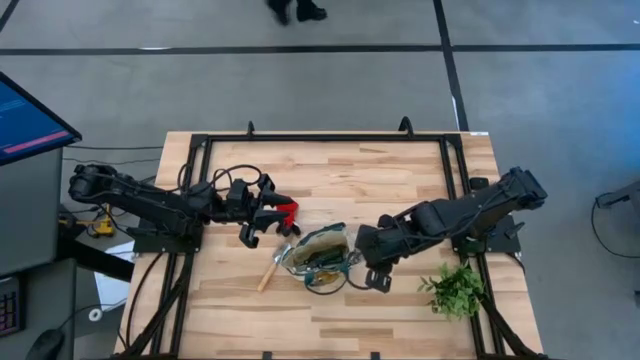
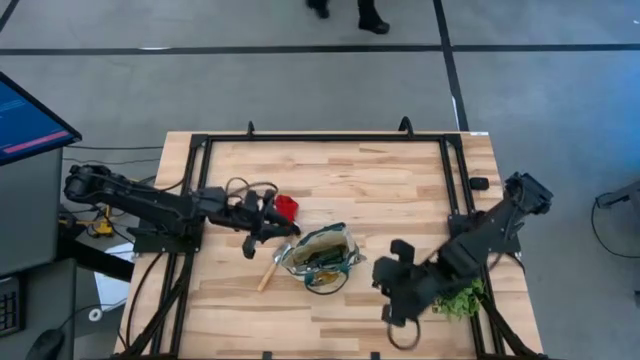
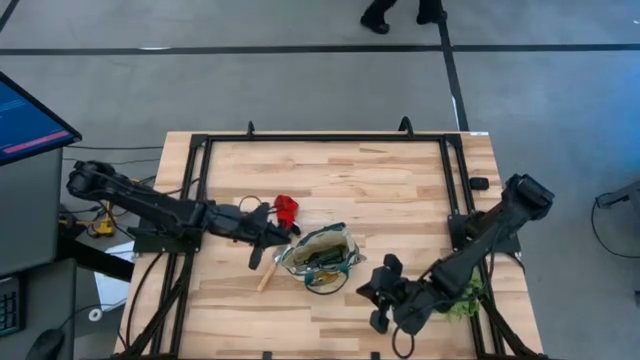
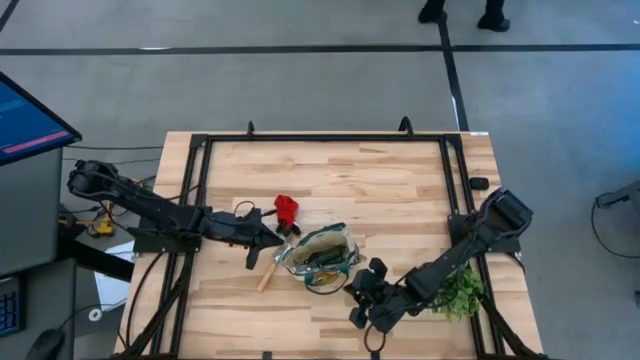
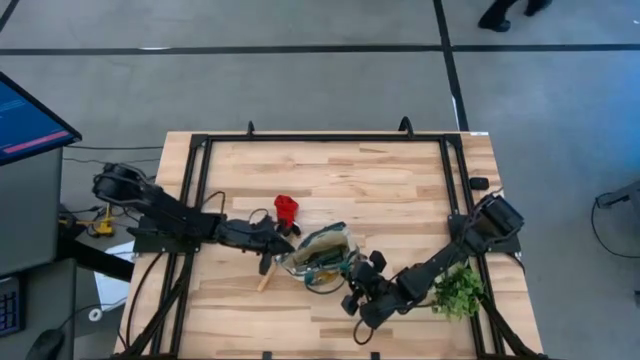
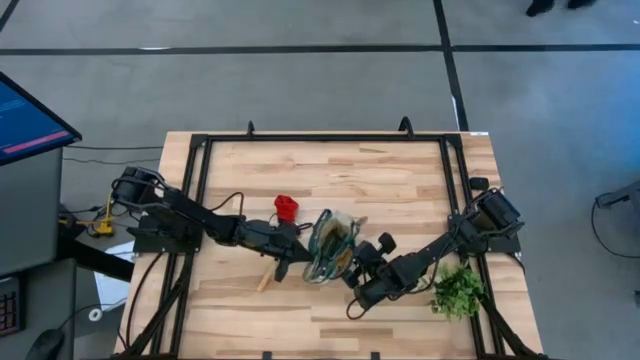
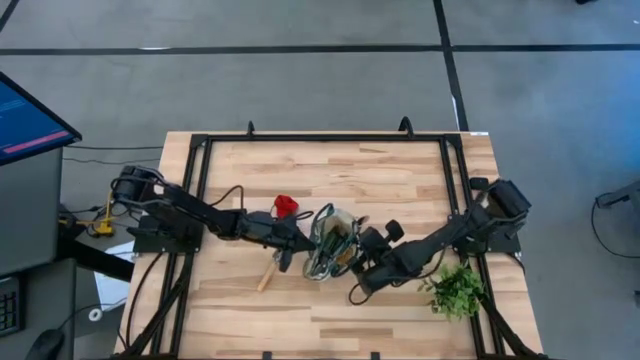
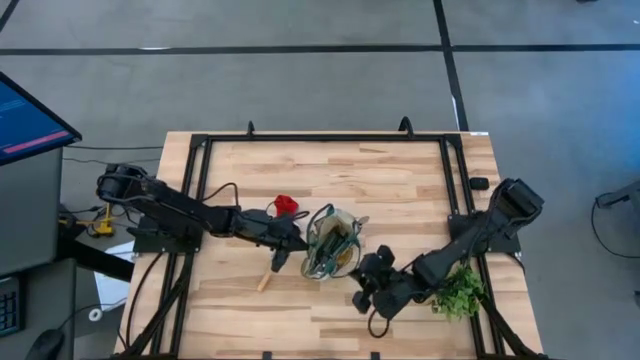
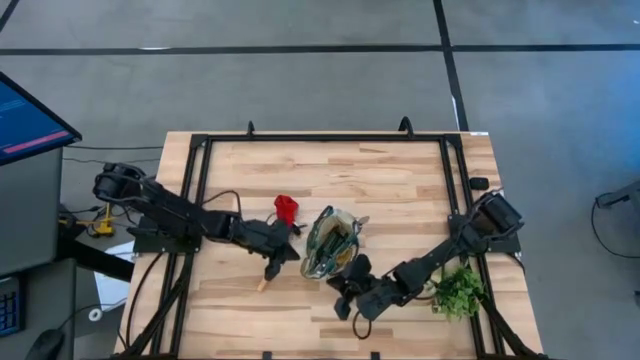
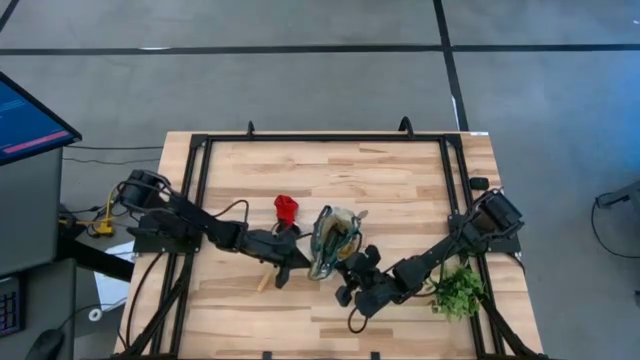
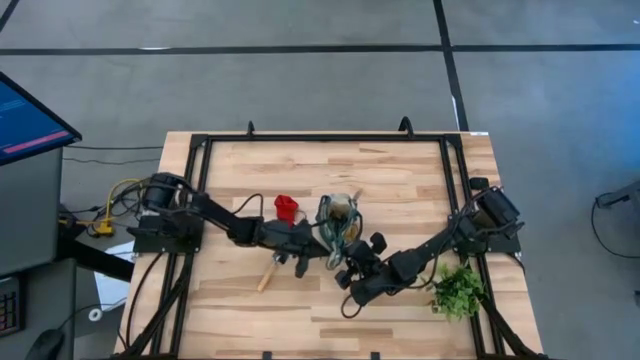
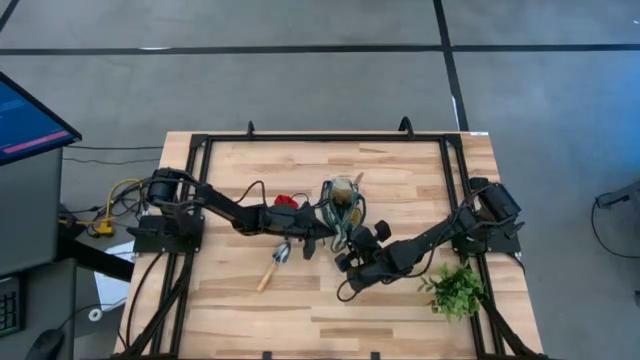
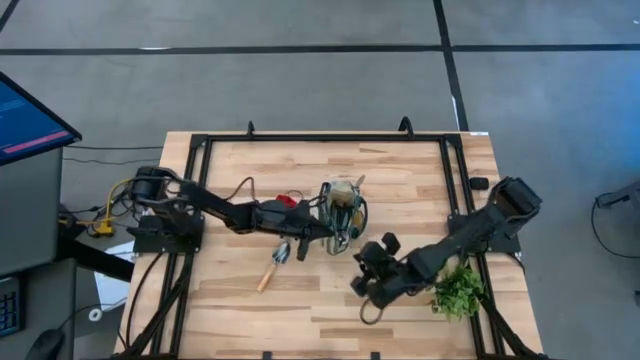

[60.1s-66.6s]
Task: Pick & Place Garden tools in Gardening bag
Adjust the gardening bag

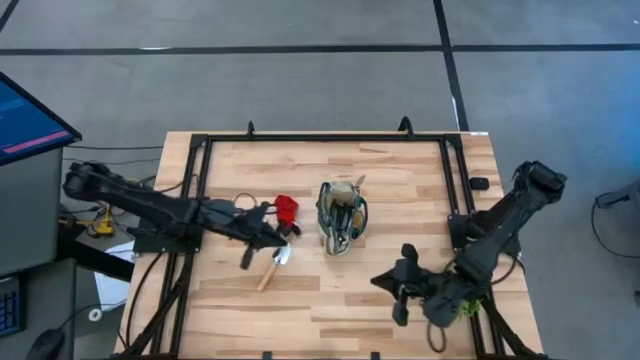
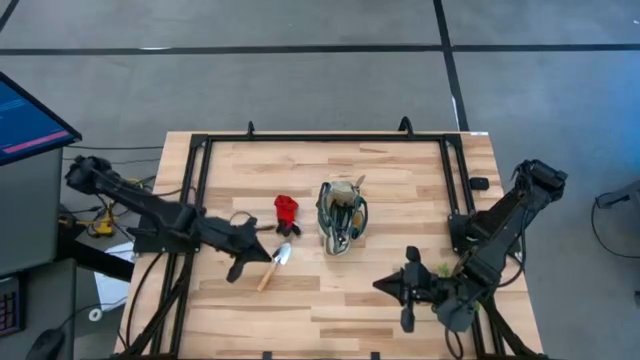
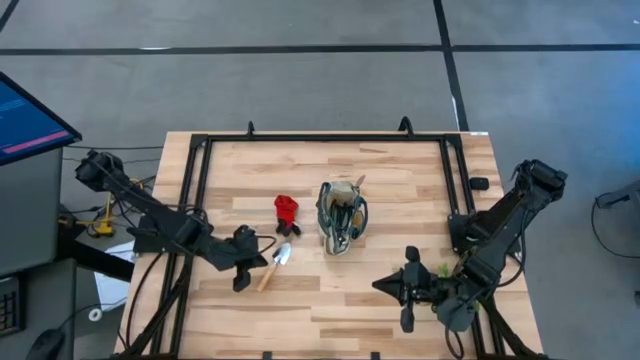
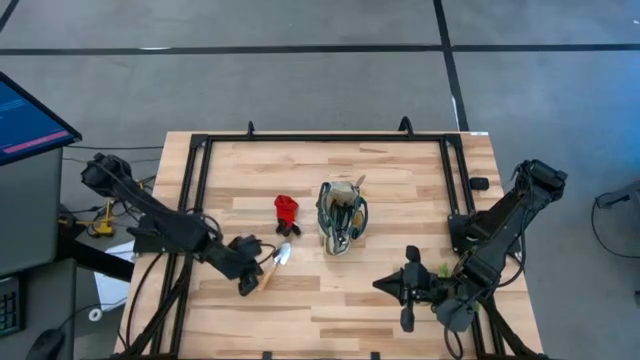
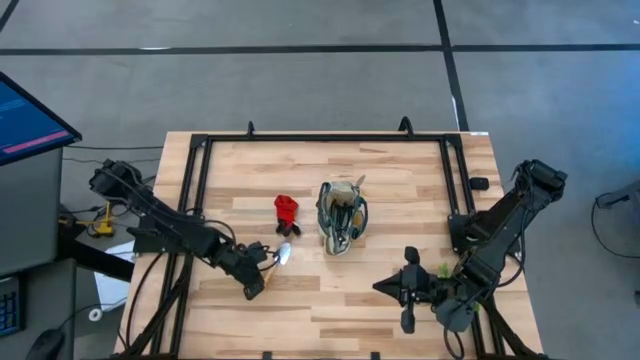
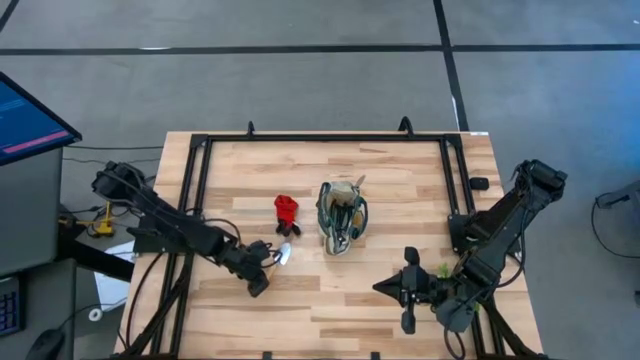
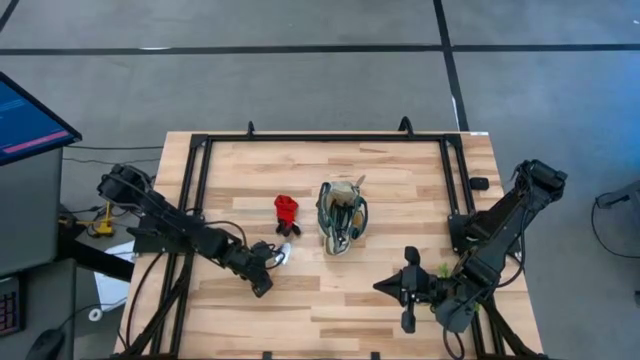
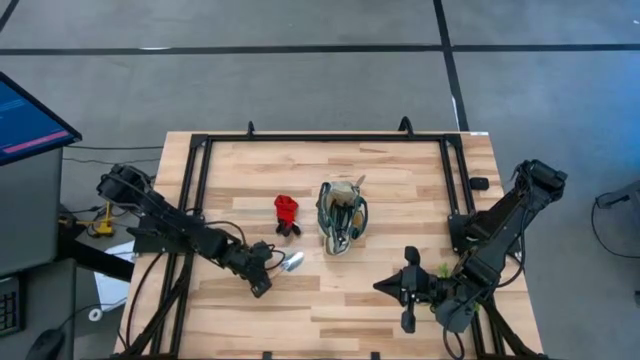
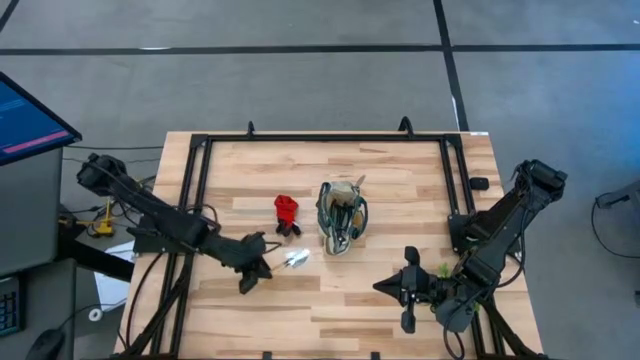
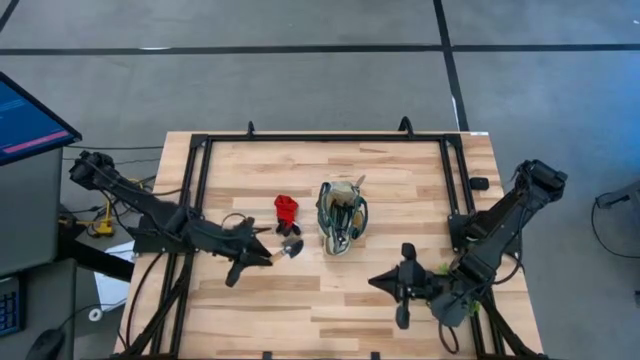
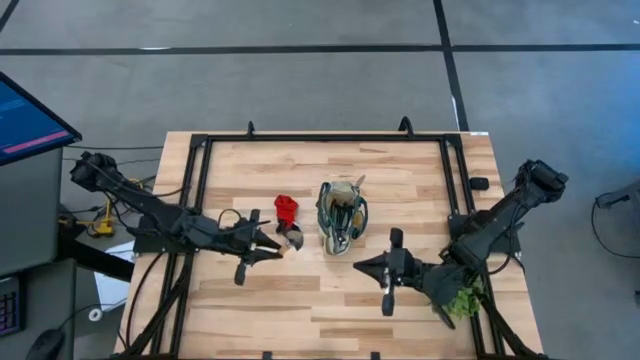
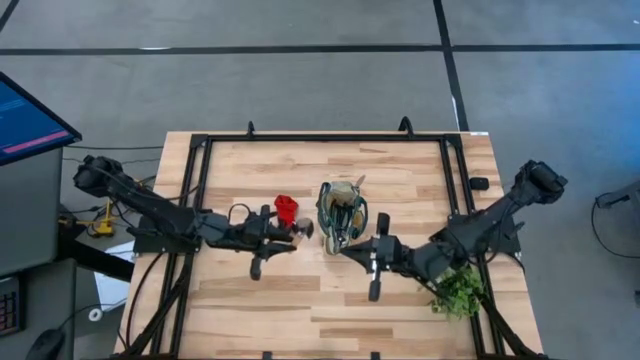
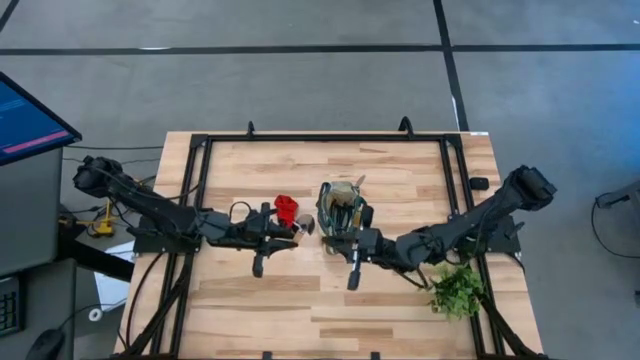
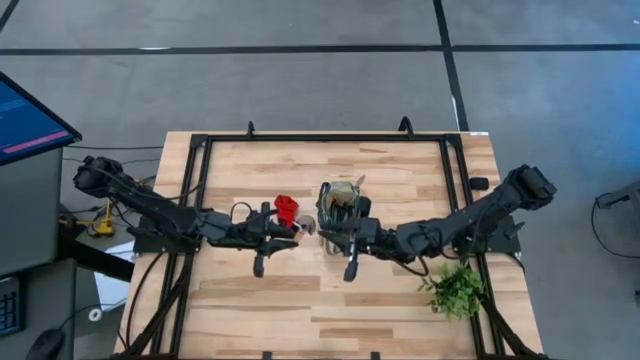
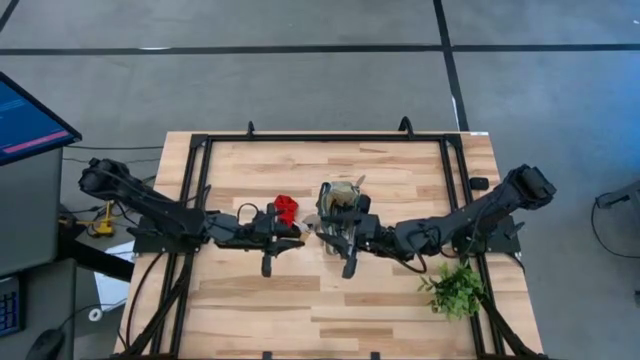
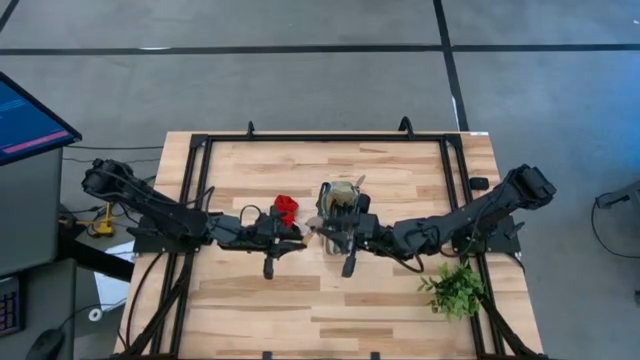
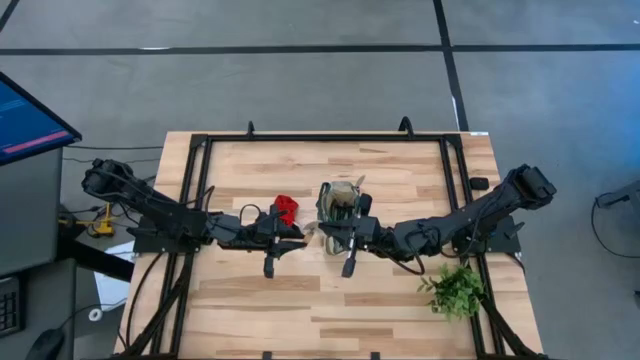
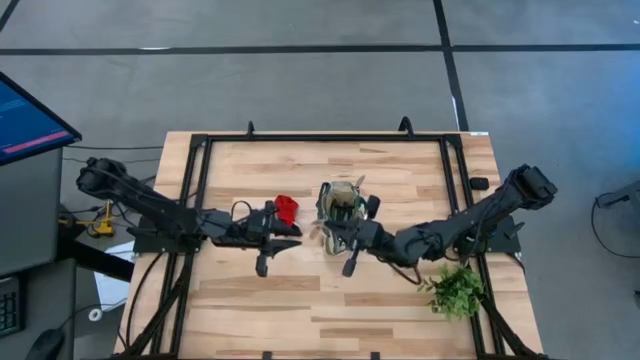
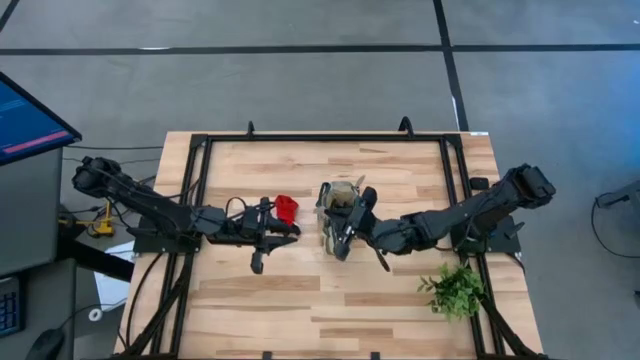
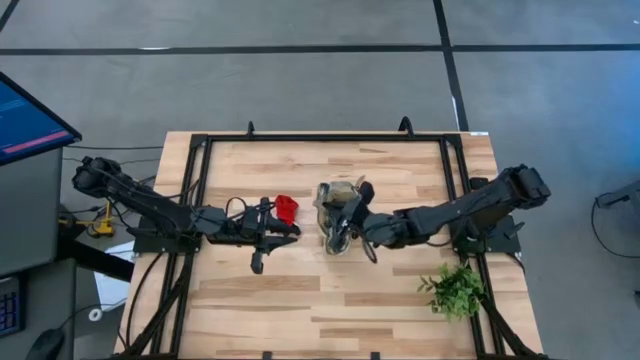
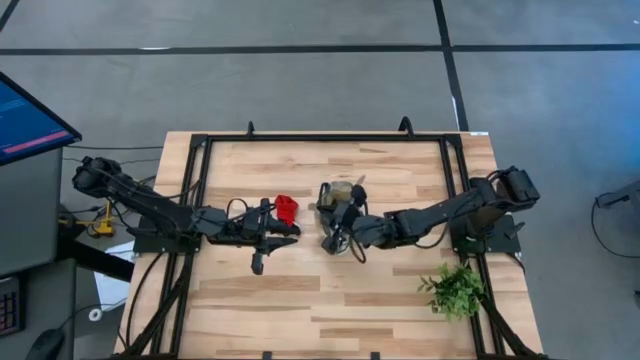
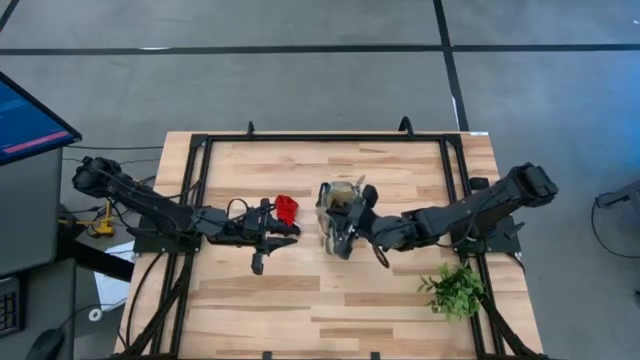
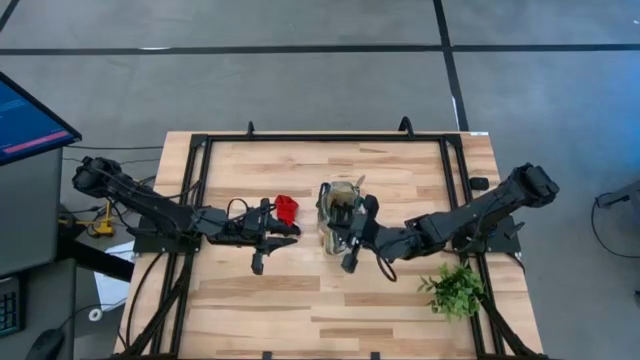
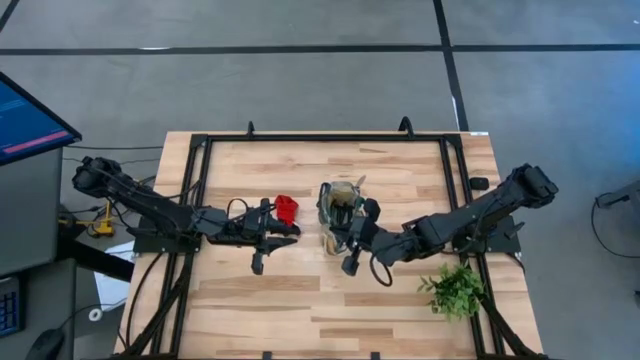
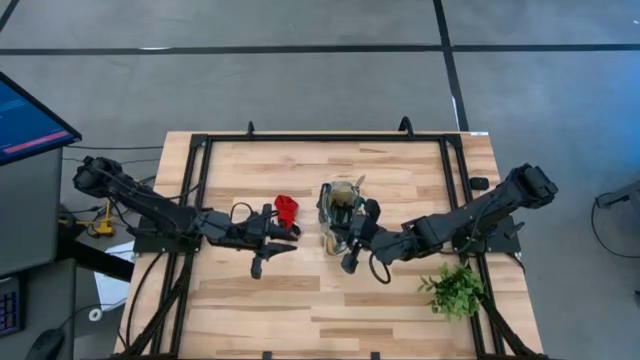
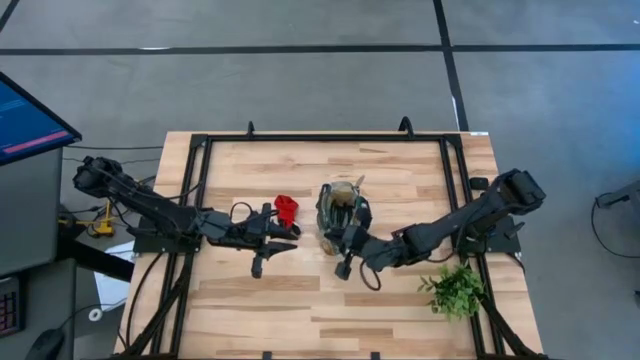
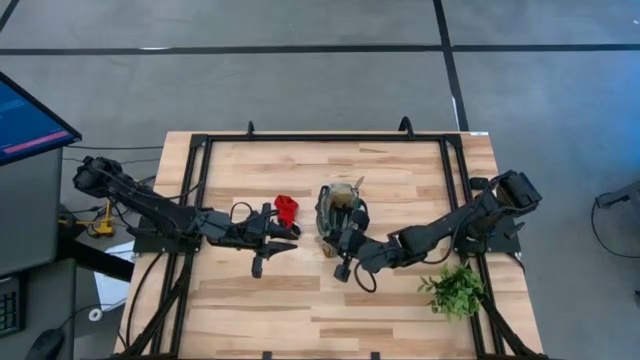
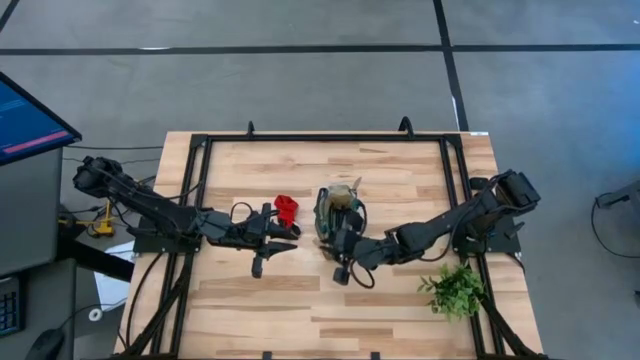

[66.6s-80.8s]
Put the trowel into the gardening bag
